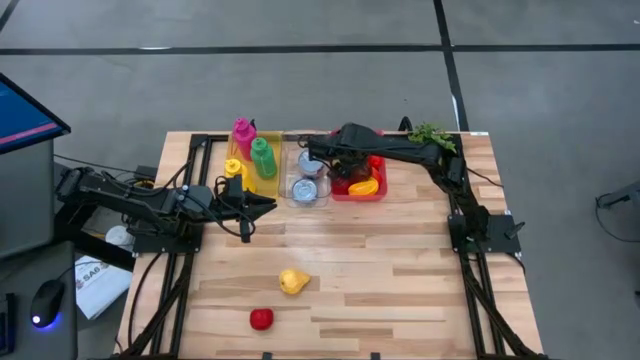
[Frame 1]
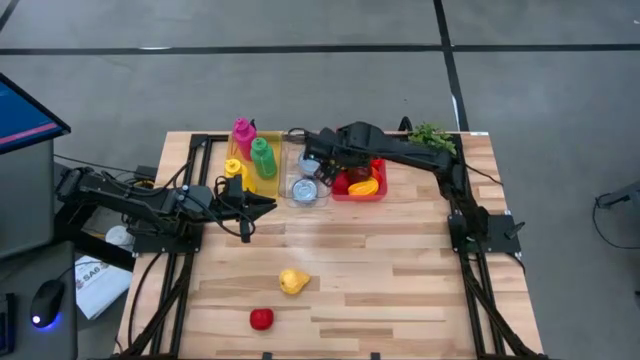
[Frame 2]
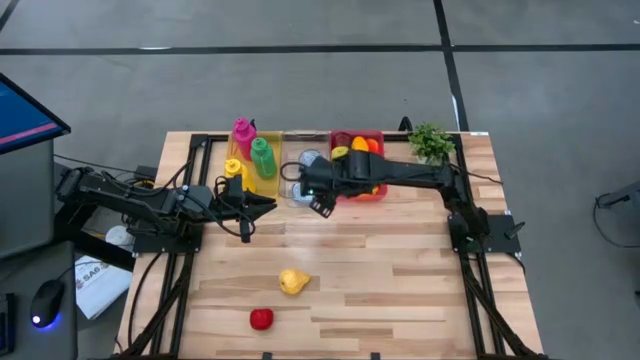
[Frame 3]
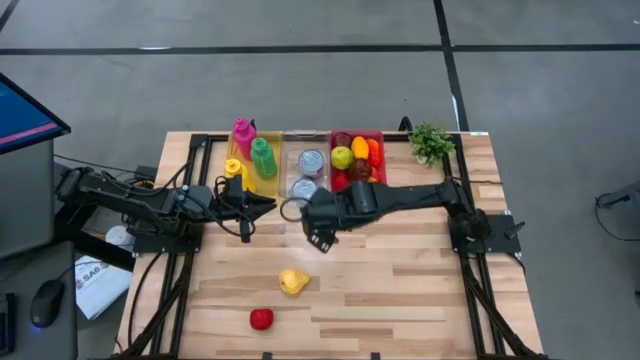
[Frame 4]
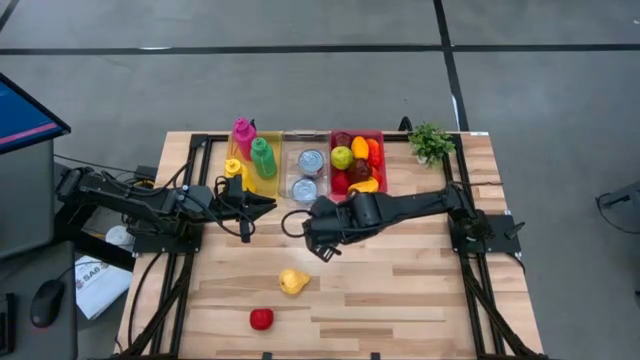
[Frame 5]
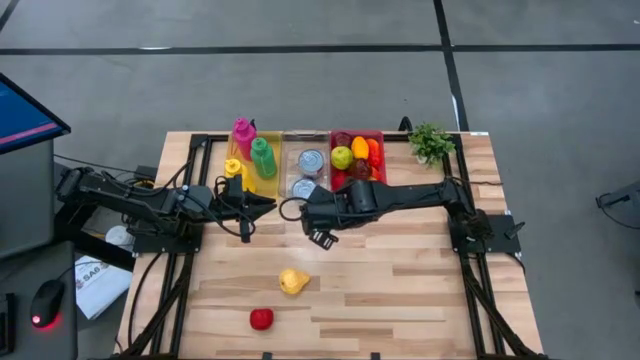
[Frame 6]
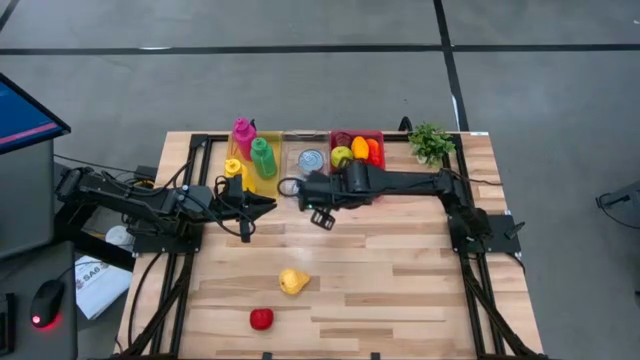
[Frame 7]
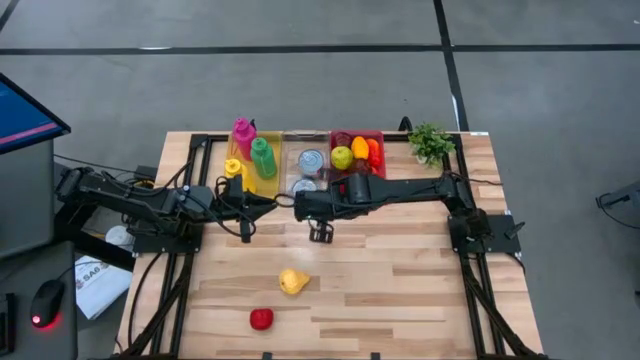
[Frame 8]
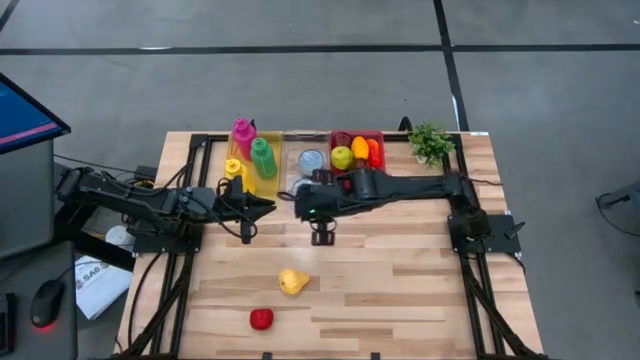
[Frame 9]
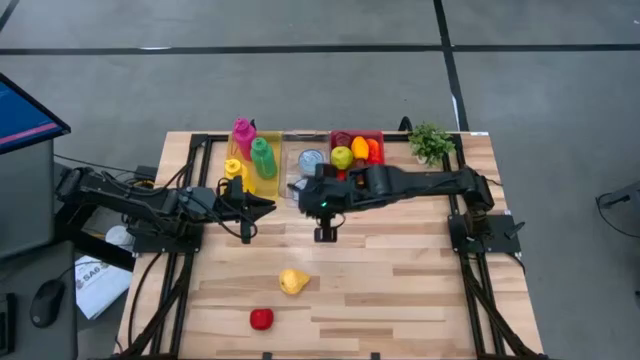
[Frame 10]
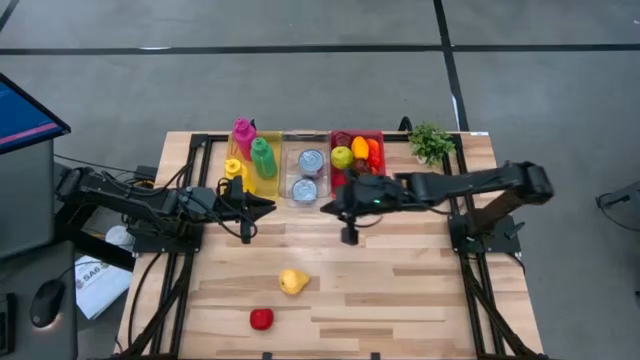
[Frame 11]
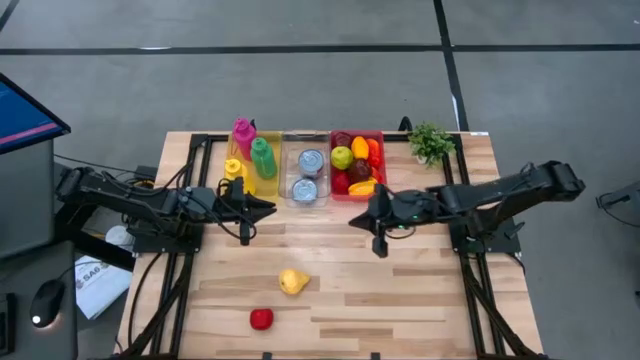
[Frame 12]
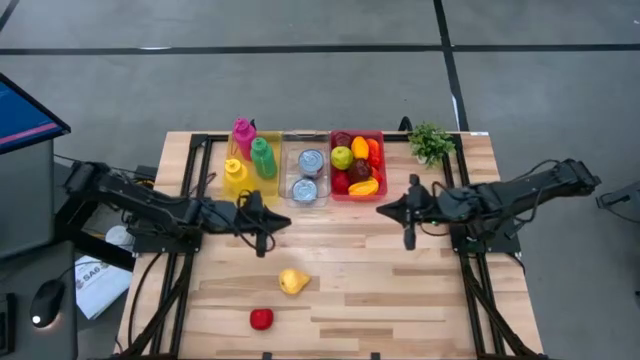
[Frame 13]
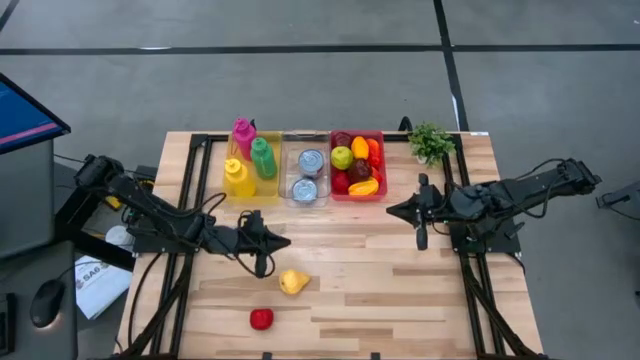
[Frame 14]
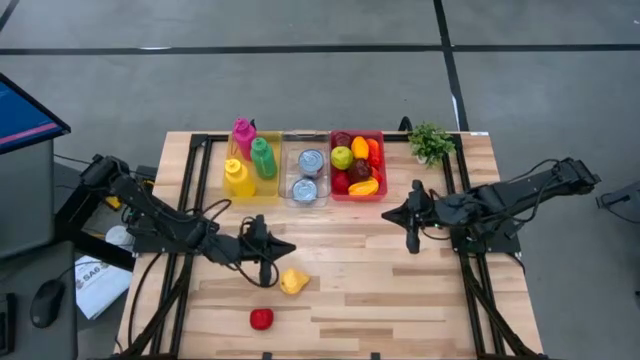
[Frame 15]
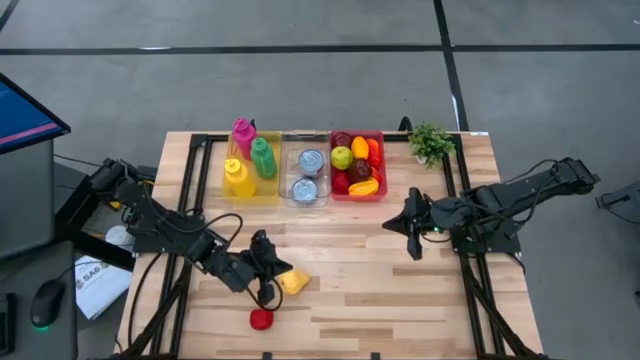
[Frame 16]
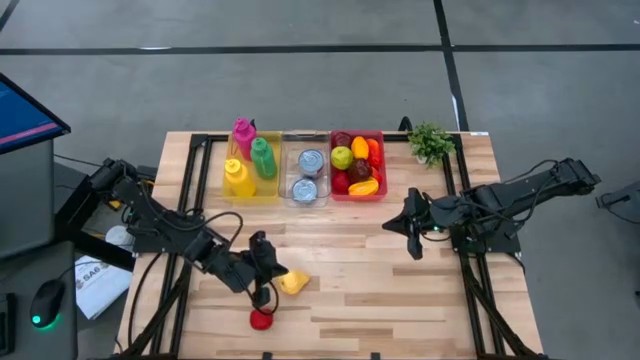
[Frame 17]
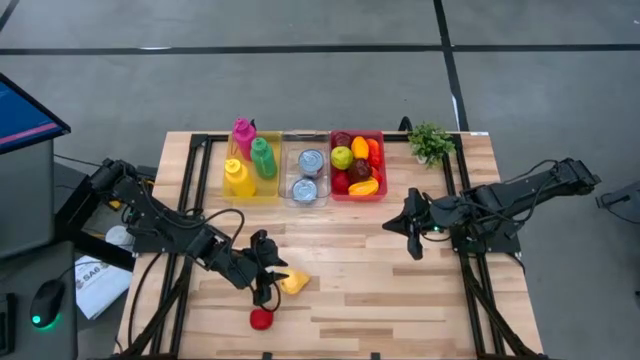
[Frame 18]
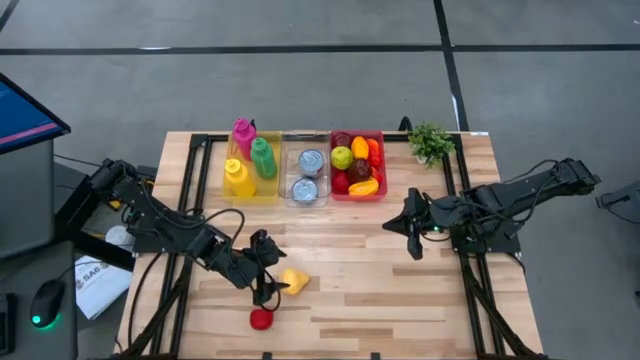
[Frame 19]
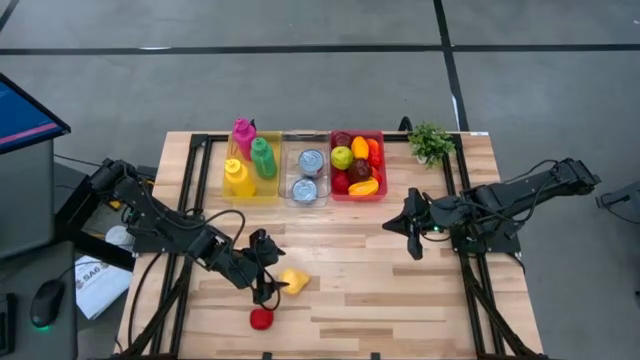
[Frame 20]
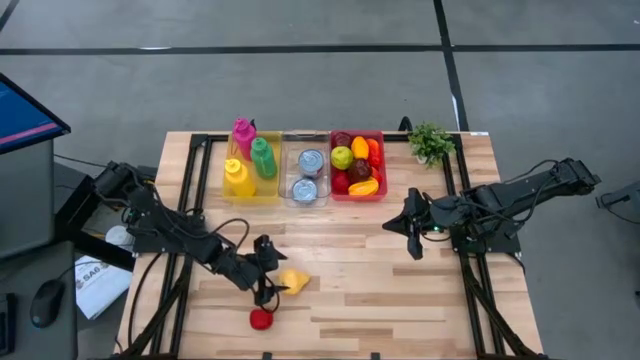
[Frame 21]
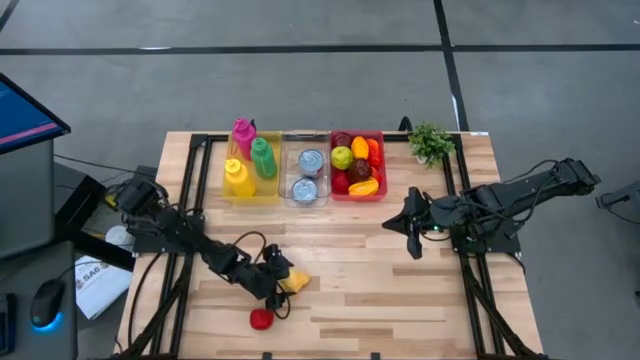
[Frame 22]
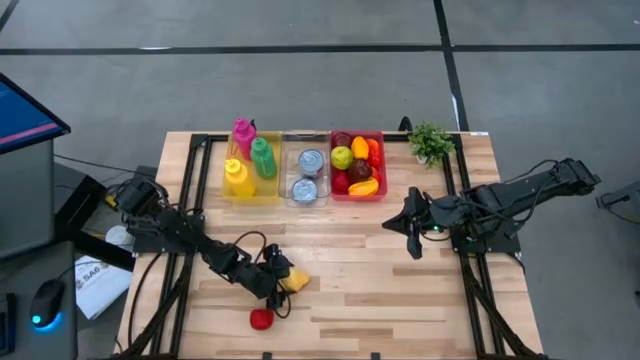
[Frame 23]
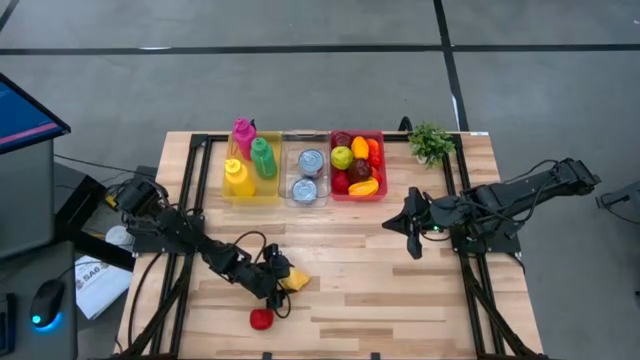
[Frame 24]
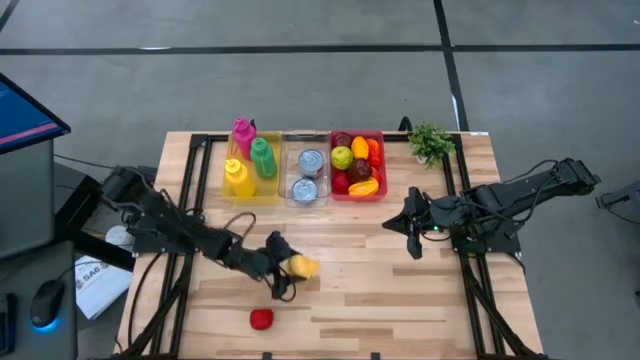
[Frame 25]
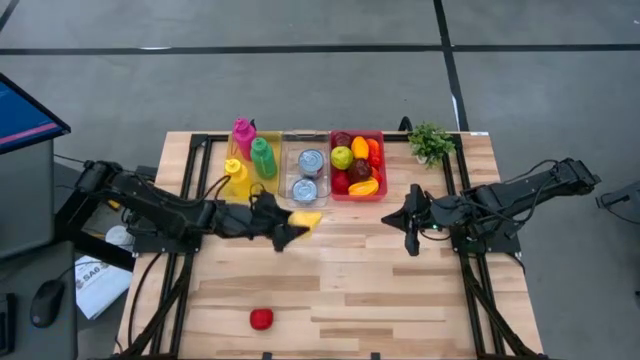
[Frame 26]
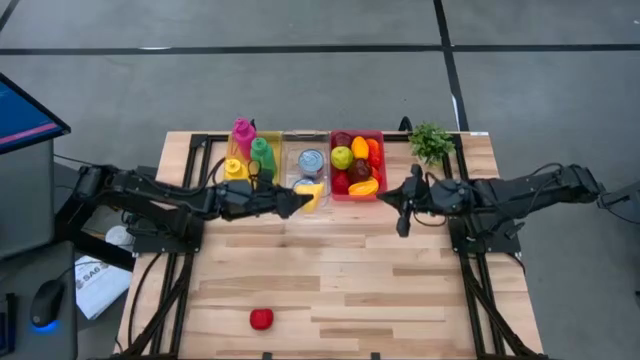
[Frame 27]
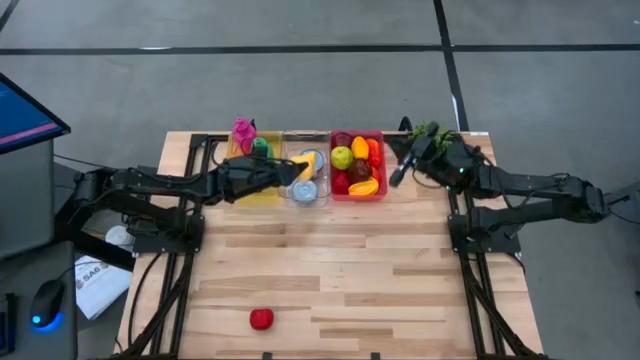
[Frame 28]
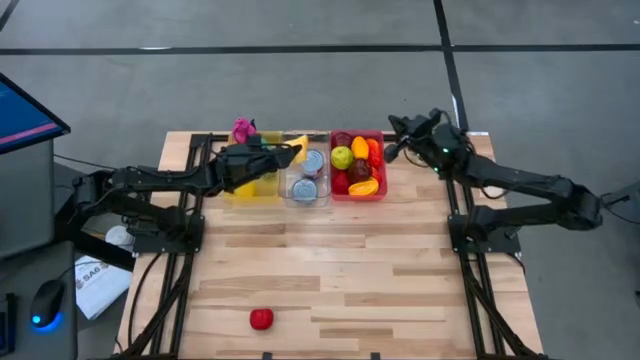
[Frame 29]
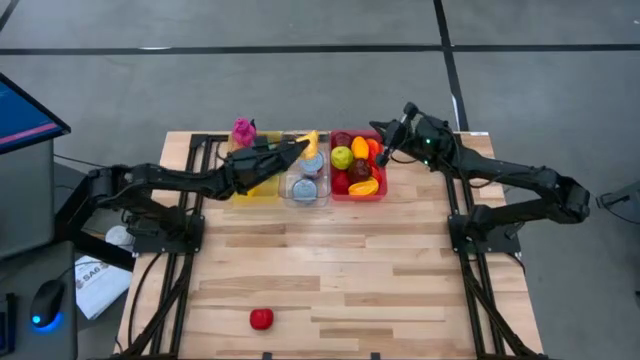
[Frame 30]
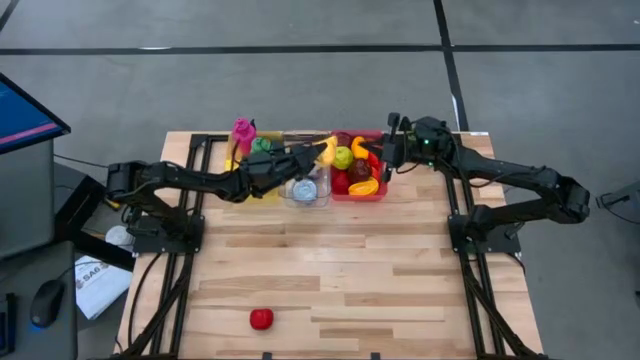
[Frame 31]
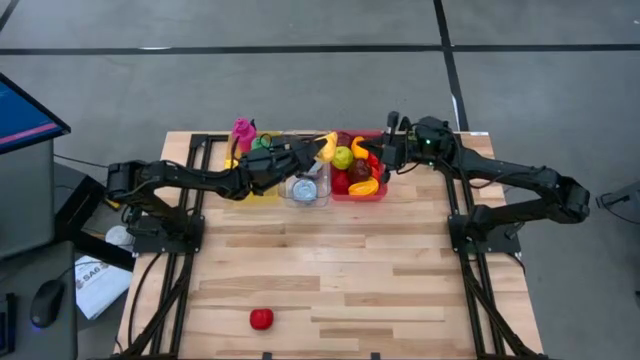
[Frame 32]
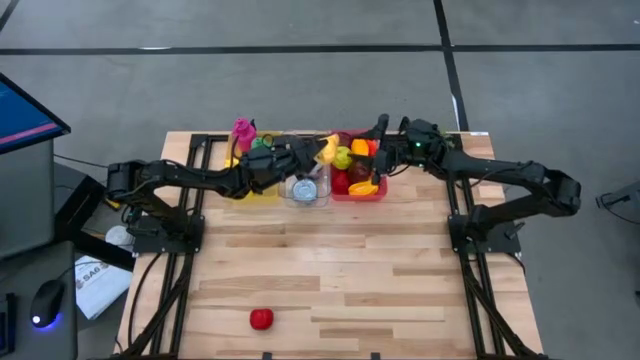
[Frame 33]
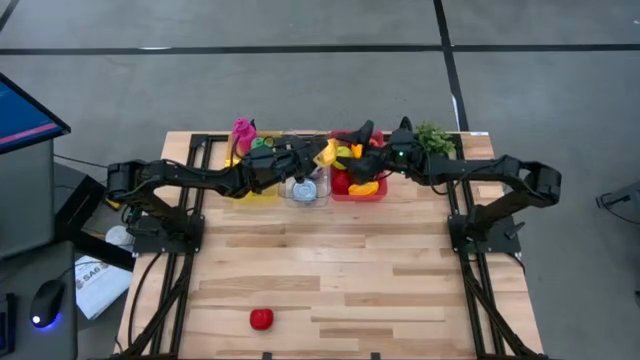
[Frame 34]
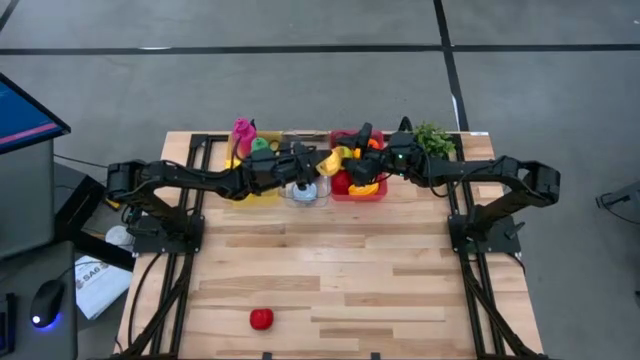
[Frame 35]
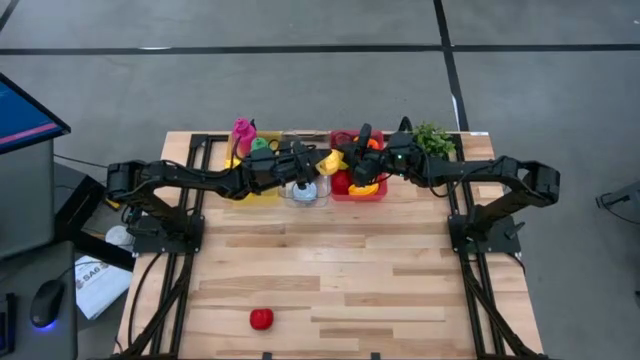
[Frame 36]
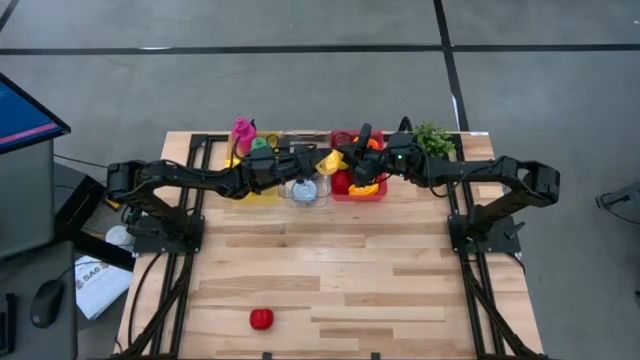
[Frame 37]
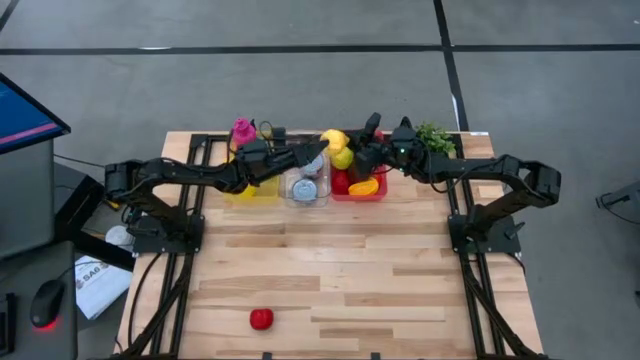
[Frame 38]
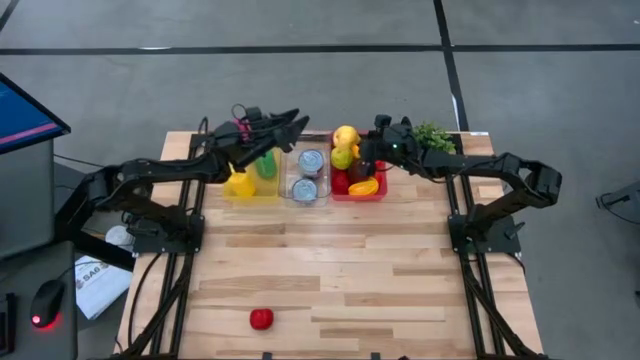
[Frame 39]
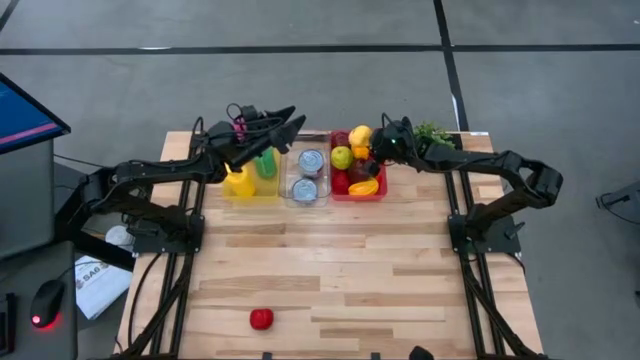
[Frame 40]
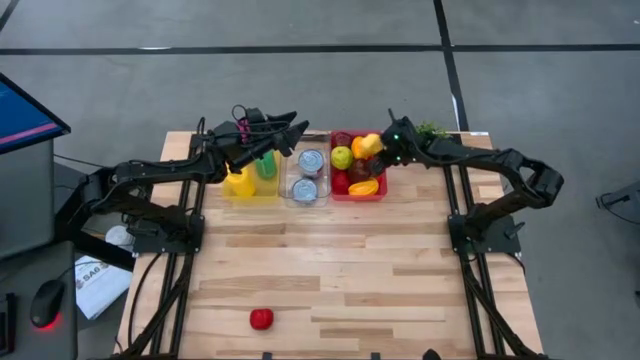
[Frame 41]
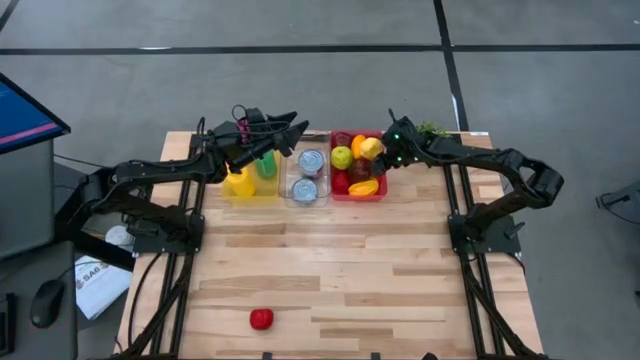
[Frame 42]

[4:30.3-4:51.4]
Task: Pick & Place Food Item
Put the yellow pear into the pink bin

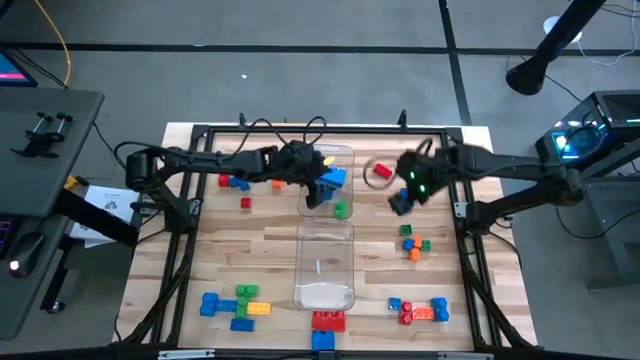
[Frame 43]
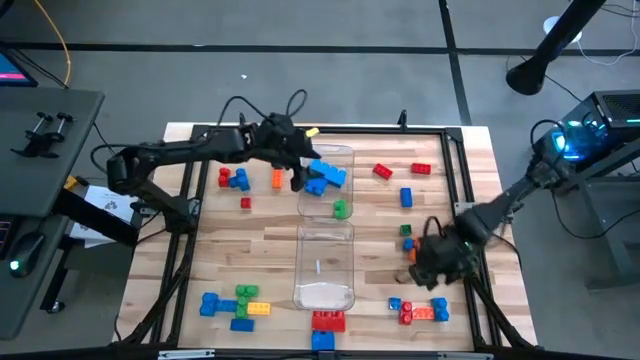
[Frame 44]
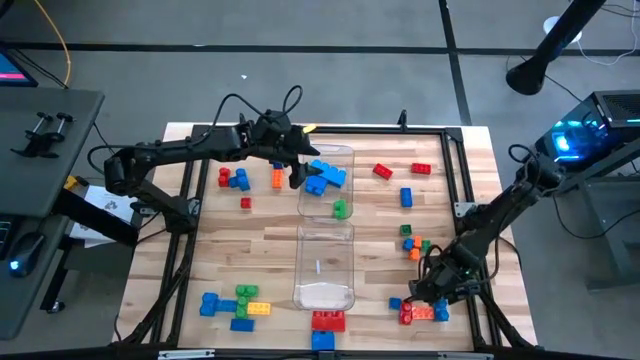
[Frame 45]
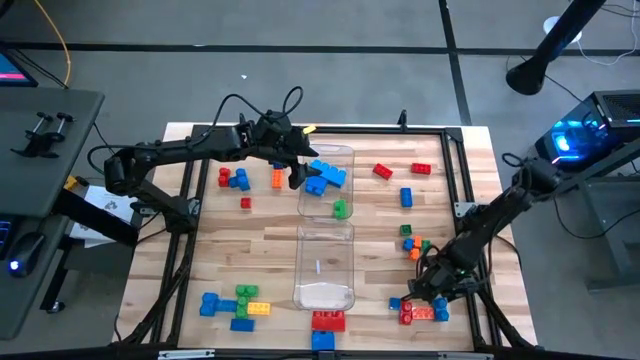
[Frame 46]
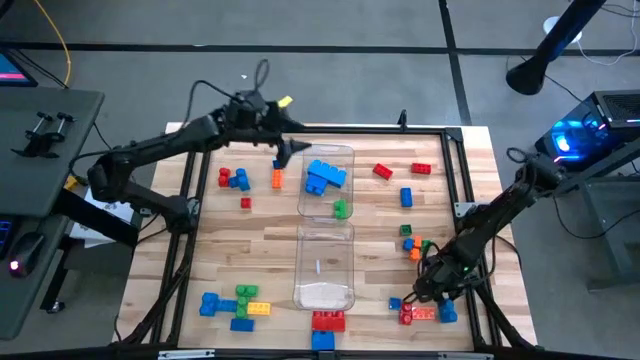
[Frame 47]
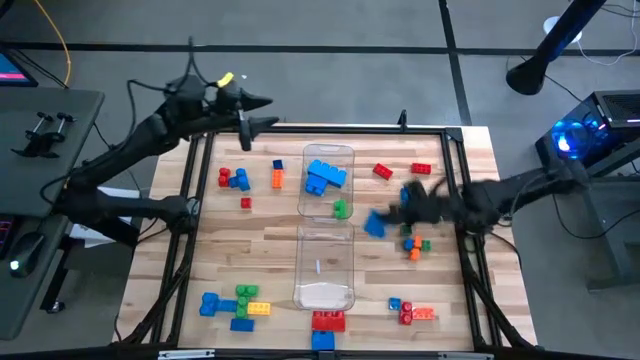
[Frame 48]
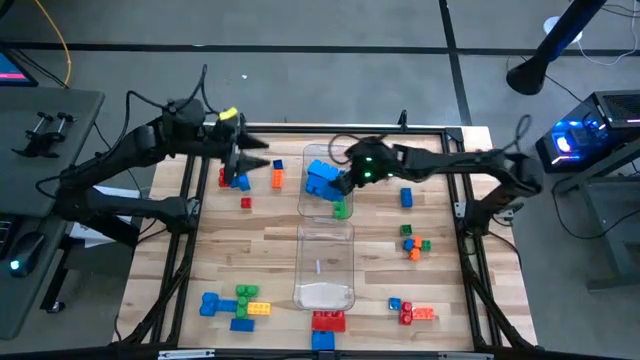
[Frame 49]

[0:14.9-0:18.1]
Task: Sort blocks by size
Put the large blue game piece in the top transparent bin
